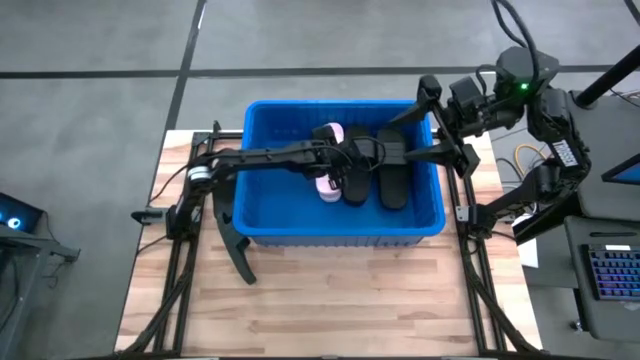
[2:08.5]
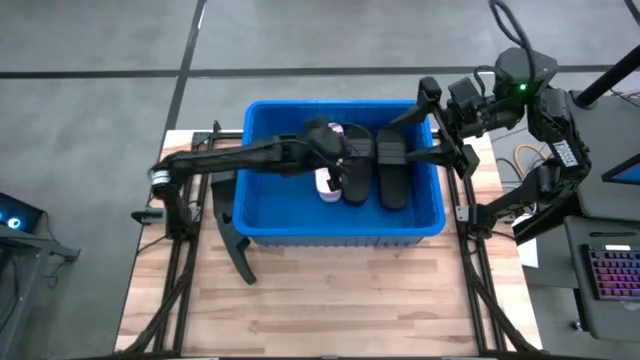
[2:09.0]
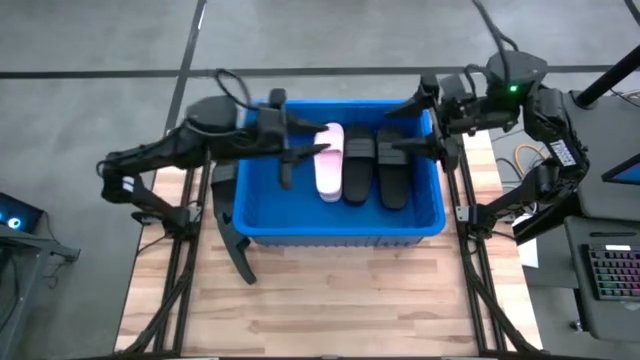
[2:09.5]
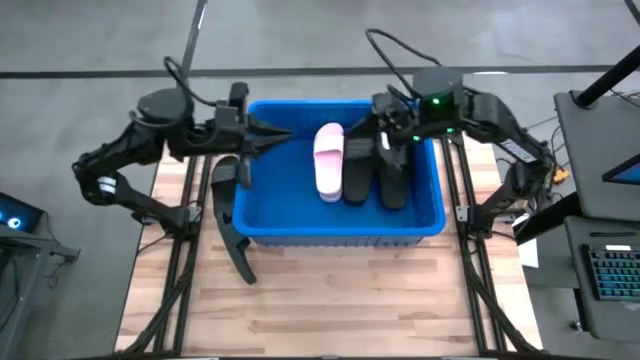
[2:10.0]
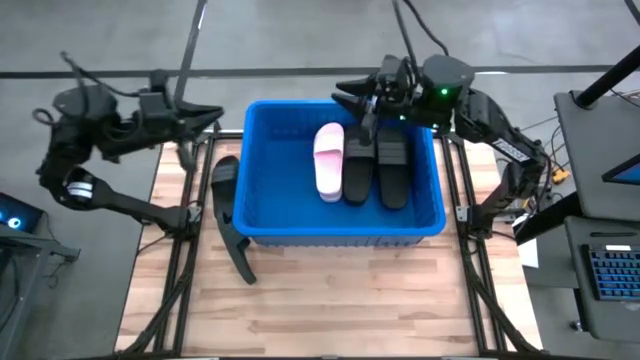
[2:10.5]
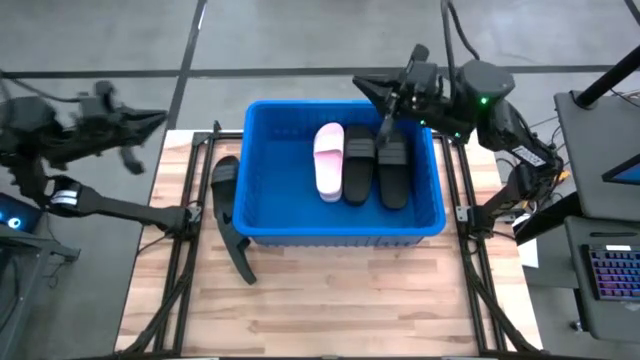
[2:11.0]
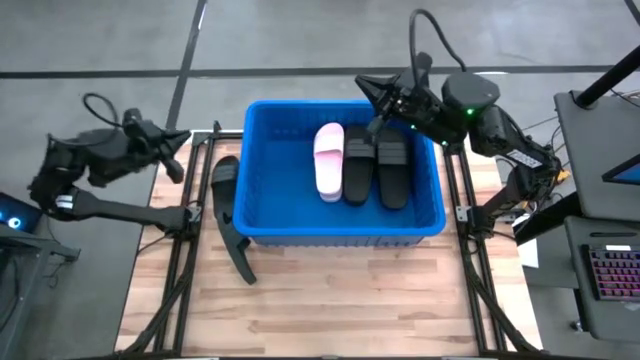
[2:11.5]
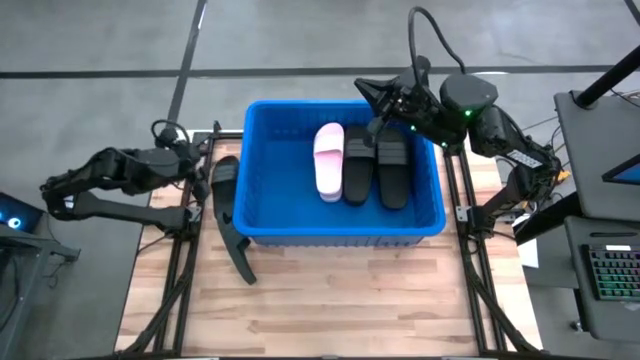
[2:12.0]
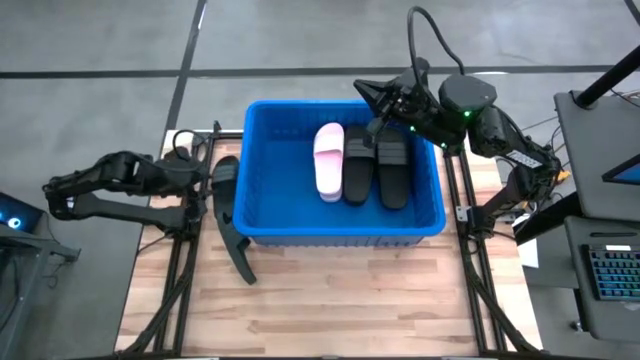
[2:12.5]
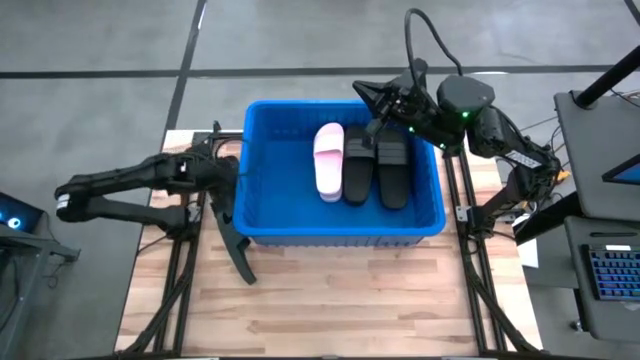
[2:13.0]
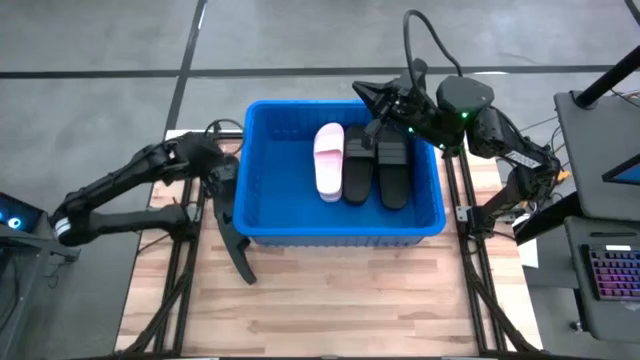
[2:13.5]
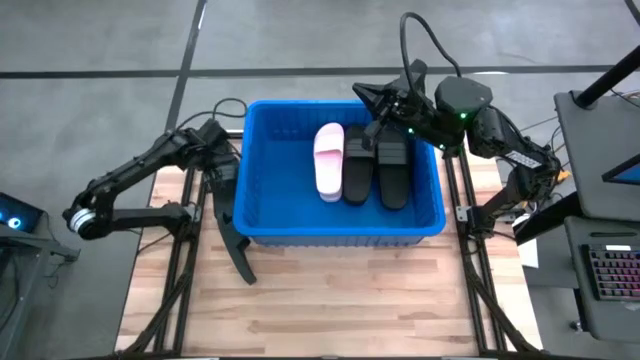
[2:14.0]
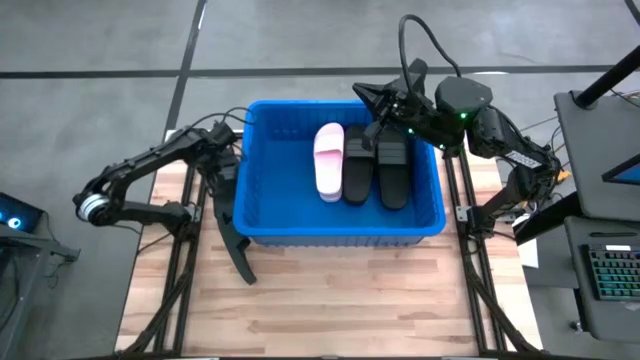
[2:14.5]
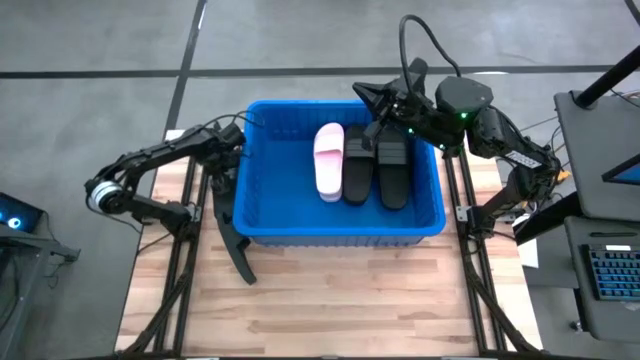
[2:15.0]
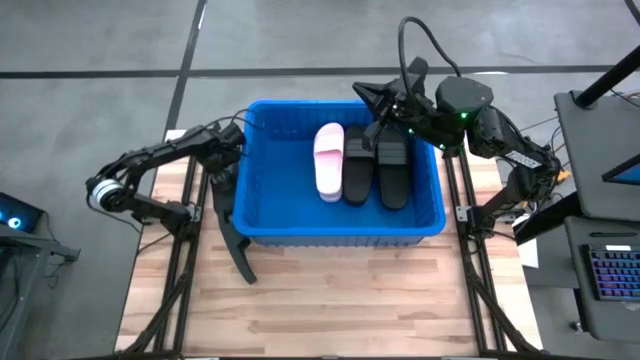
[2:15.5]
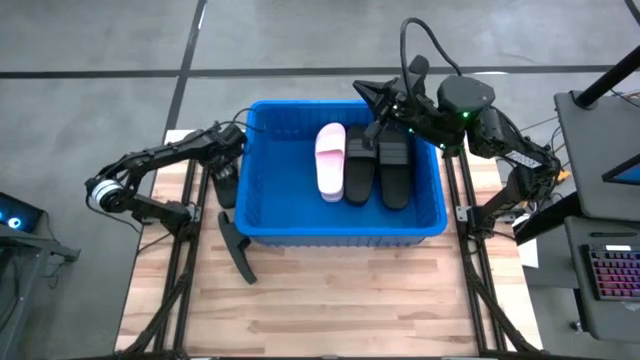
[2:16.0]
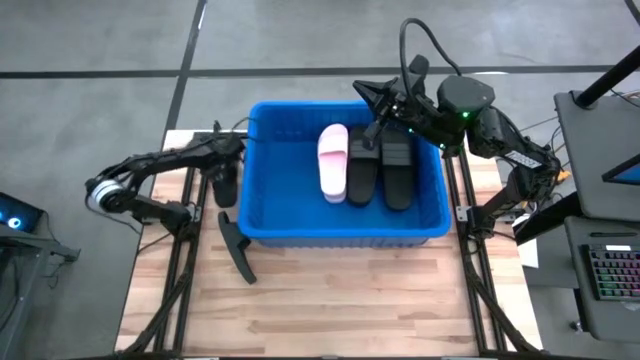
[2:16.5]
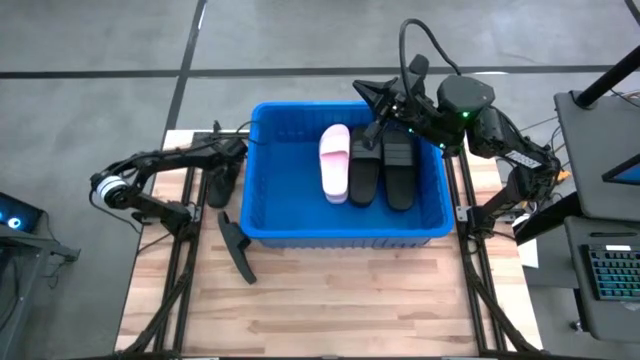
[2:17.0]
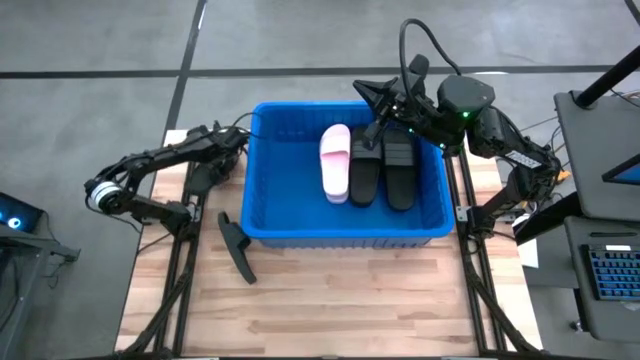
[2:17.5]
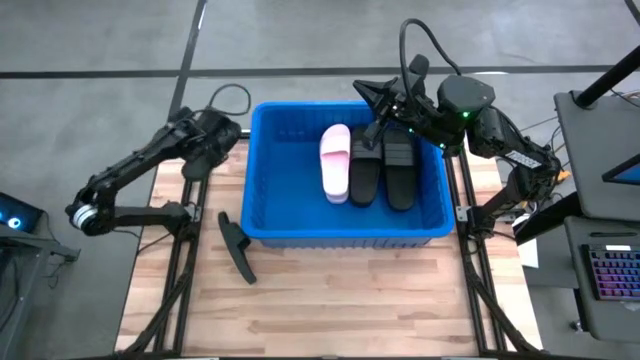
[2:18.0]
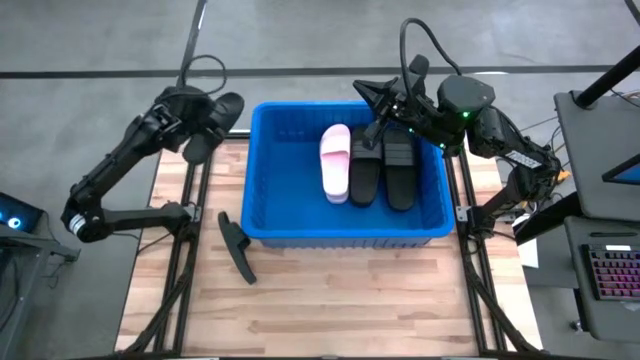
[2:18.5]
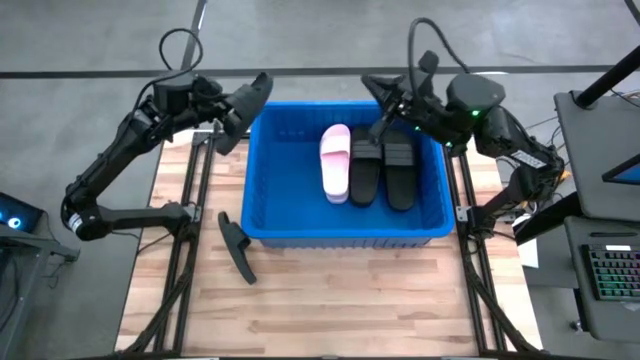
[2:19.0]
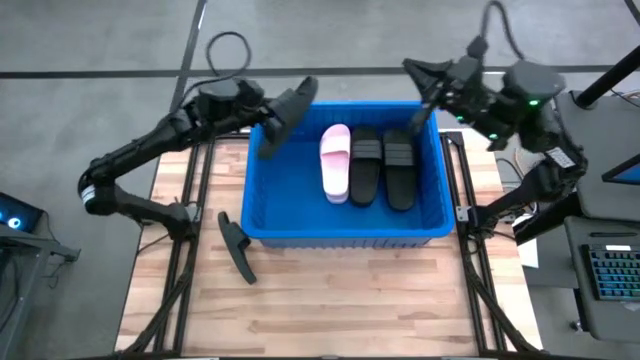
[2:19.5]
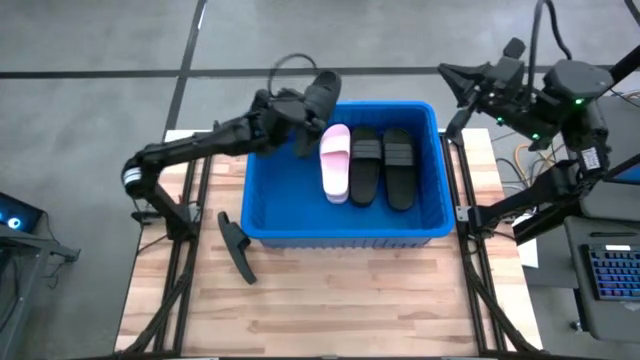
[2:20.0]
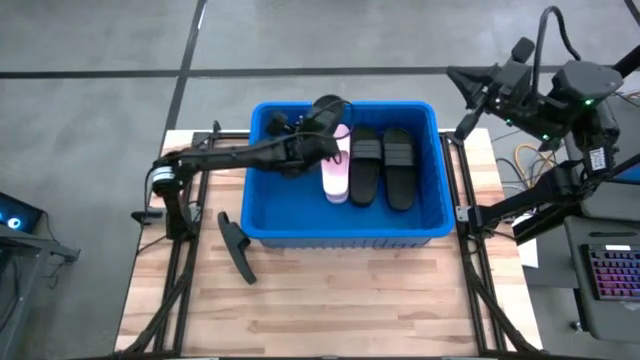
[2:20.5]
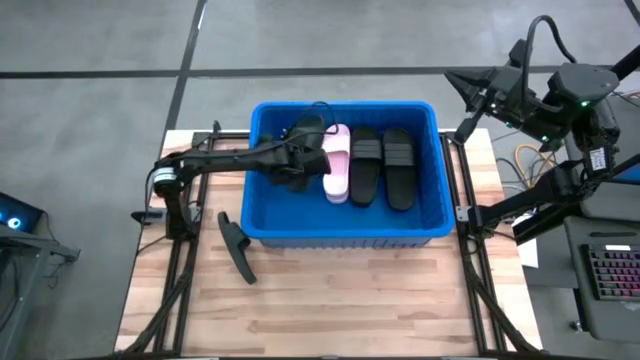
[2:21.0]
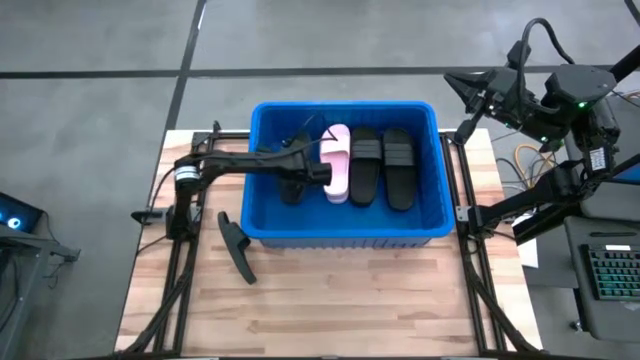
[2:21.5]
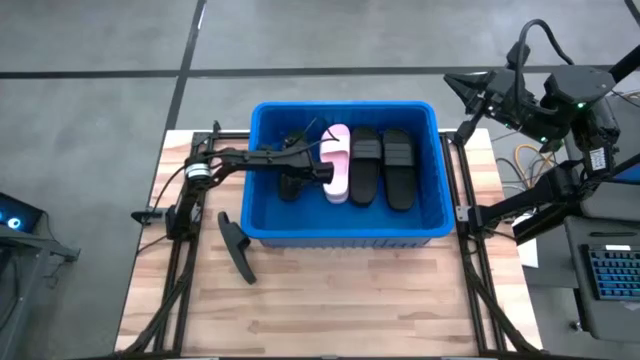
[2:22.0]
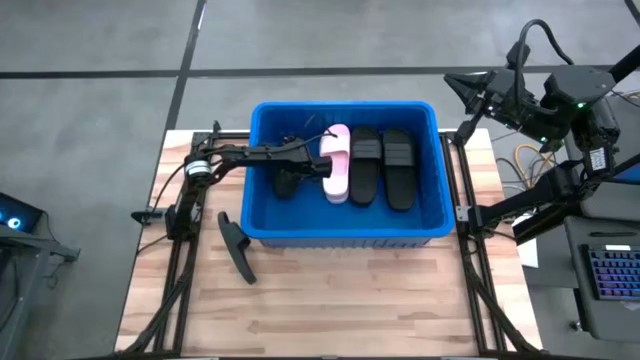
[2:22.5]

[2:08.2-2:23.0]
Task: Pick and place slides into bin
Put the black slide into the blue bin

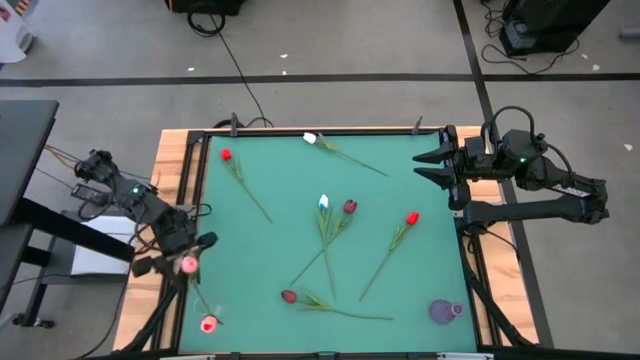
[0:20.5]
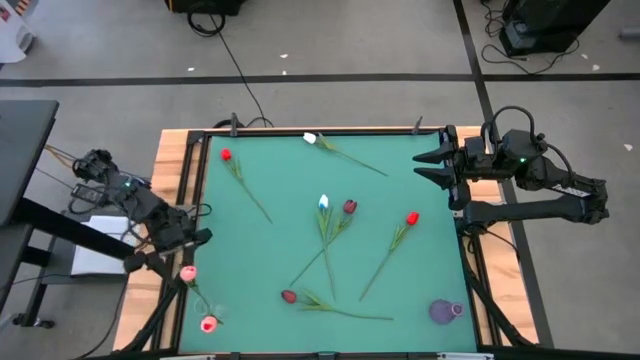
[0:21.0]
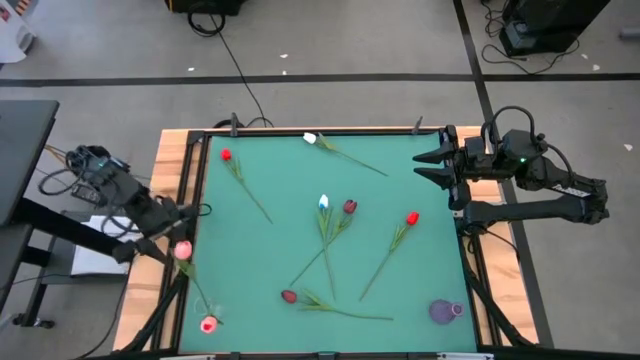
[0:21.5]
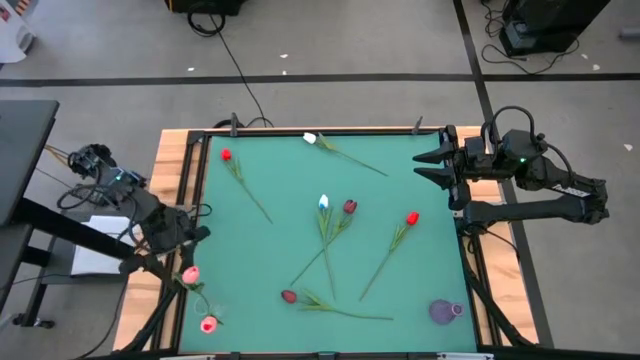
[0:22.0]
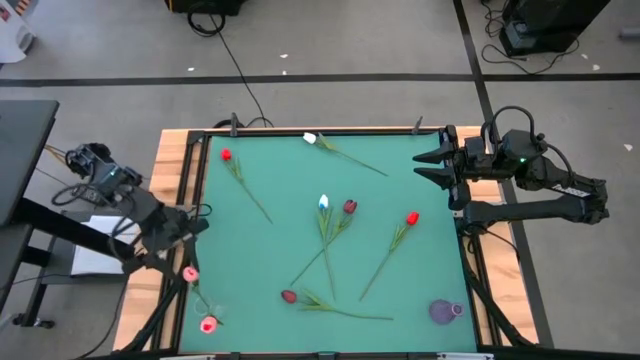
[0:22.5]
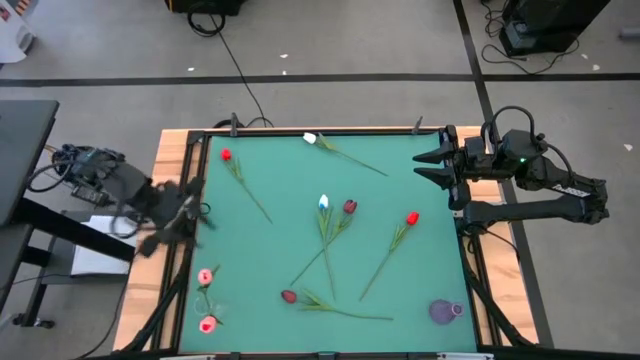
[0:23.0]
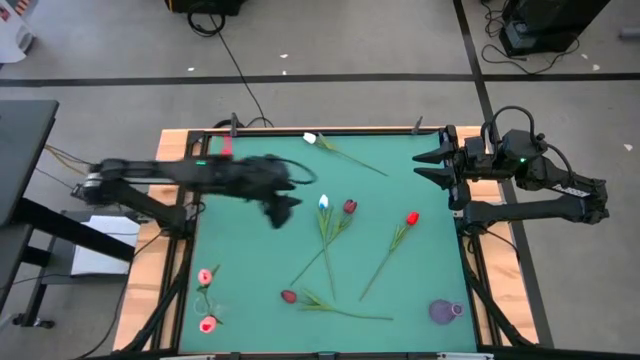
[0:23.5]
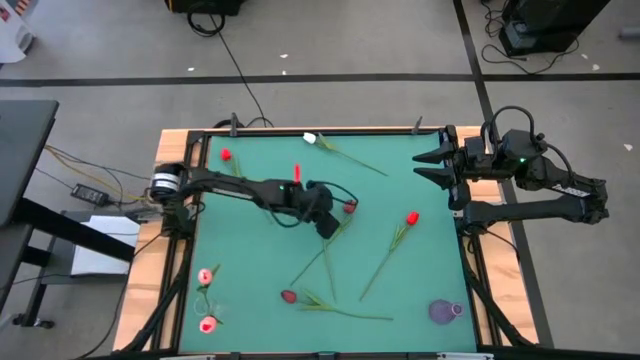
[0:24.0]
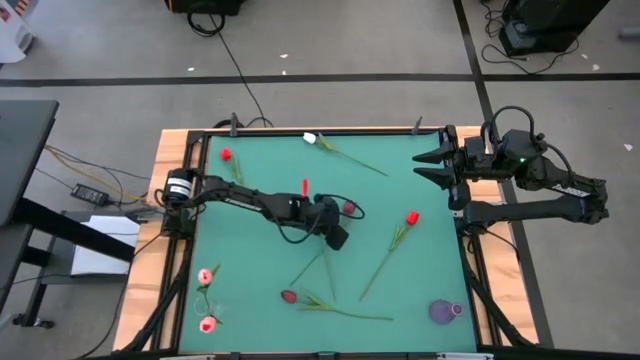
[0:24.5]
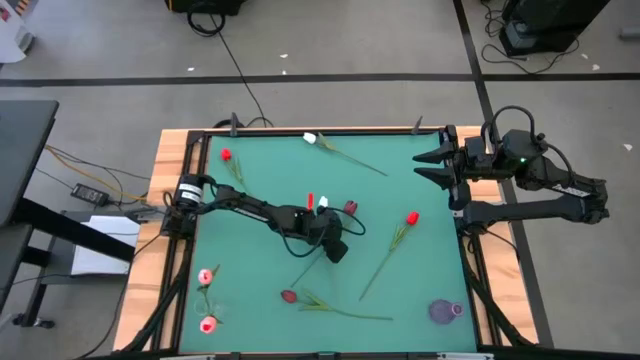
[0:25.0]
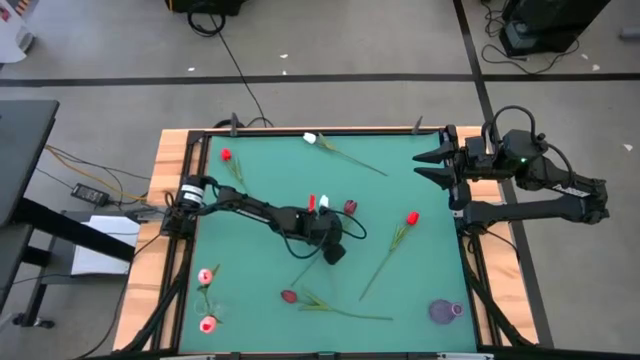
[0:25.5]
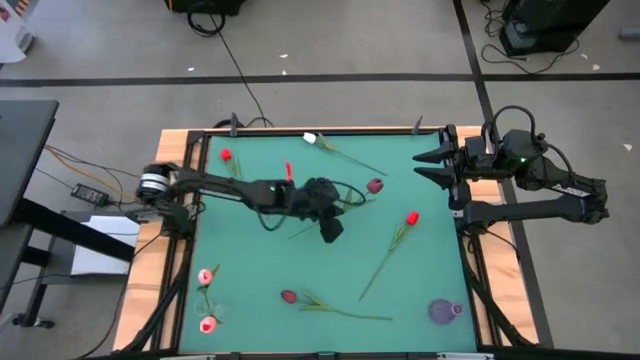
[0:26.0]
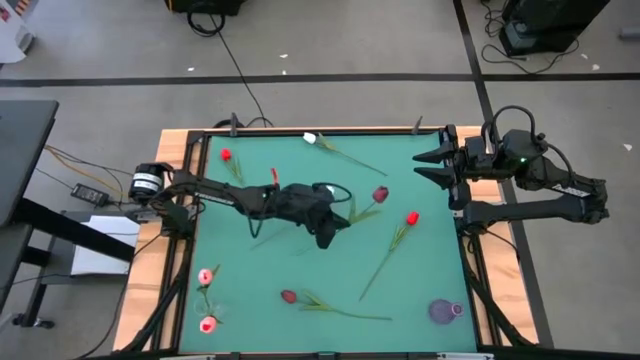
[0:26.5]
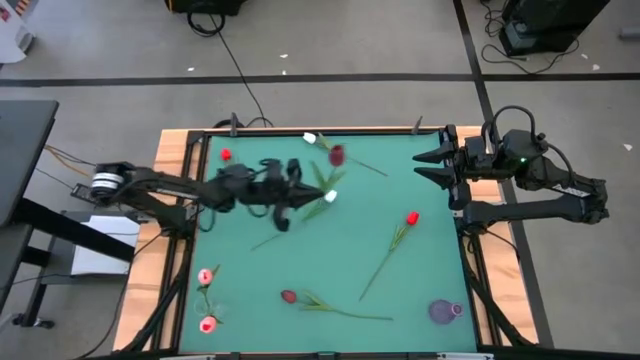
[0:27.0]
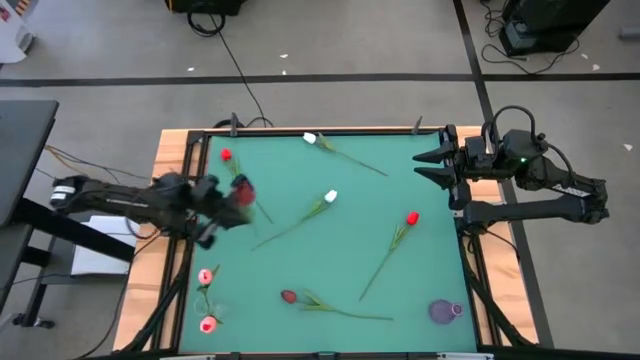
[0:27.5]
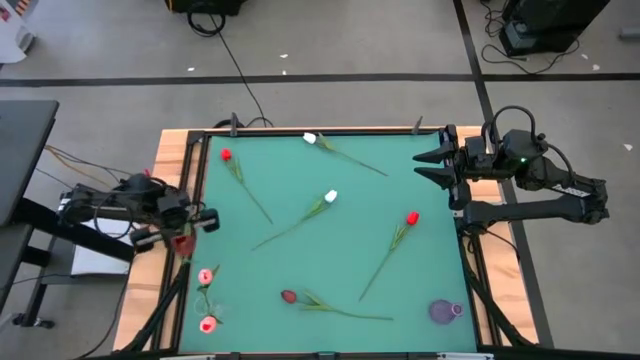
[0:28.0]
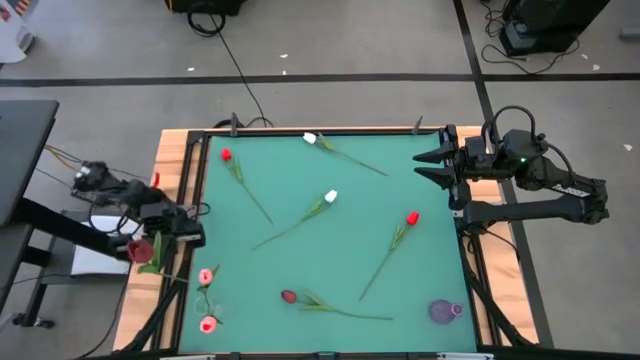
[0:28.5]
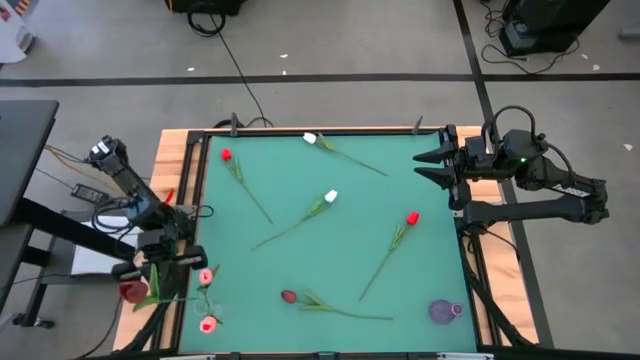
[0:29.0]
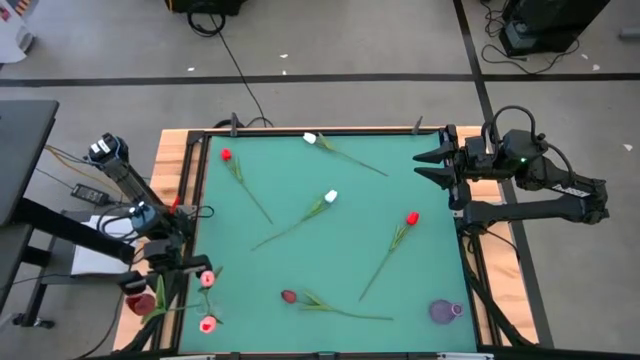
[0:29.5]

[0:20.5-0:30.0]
Task: Sort flowers into vase by color
Put the top dark red flower into the transparent vase
